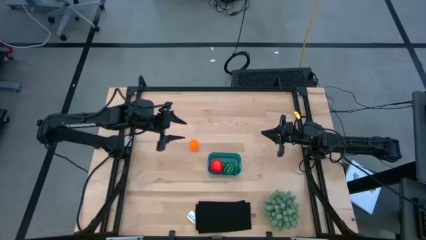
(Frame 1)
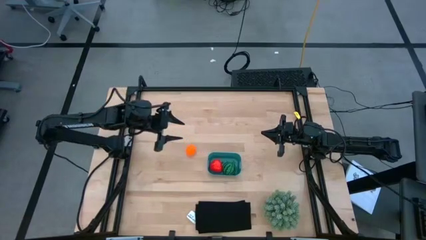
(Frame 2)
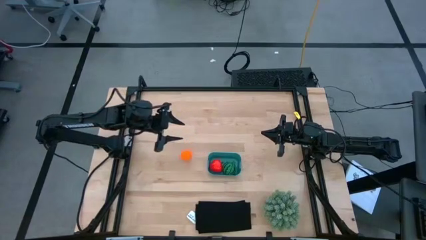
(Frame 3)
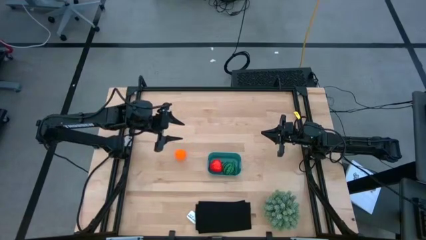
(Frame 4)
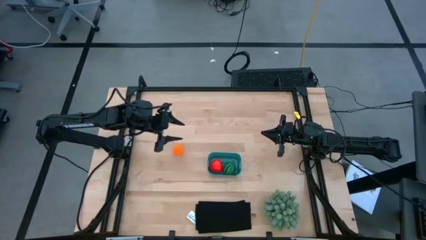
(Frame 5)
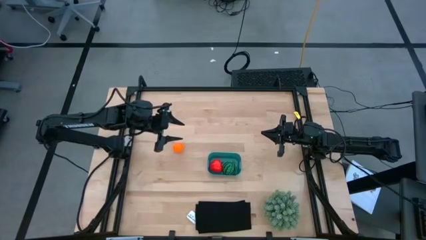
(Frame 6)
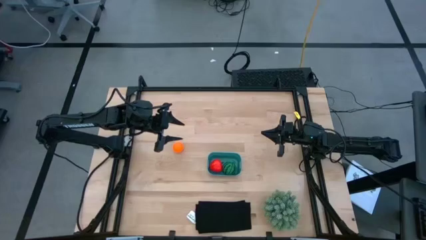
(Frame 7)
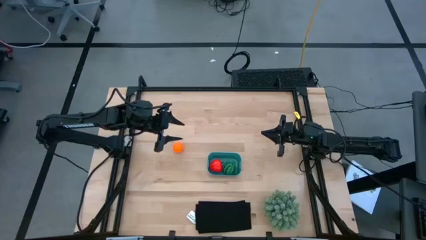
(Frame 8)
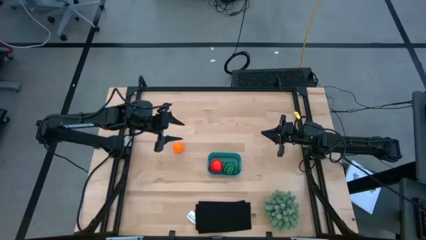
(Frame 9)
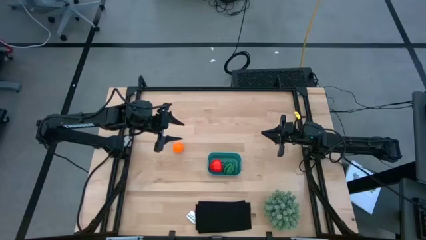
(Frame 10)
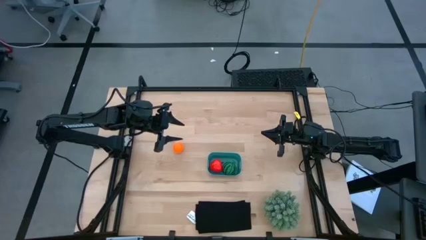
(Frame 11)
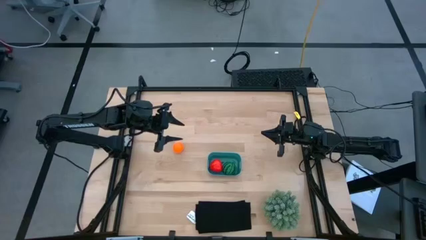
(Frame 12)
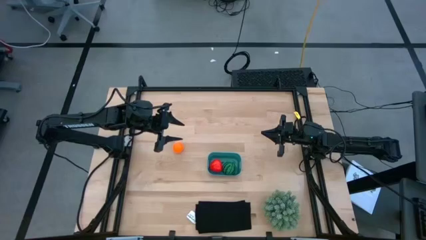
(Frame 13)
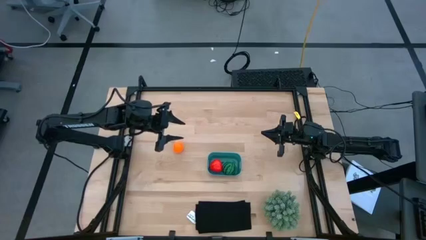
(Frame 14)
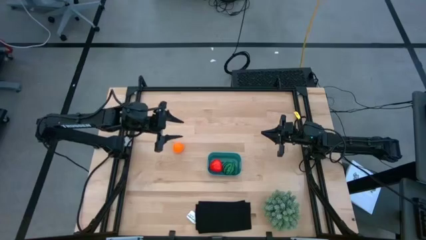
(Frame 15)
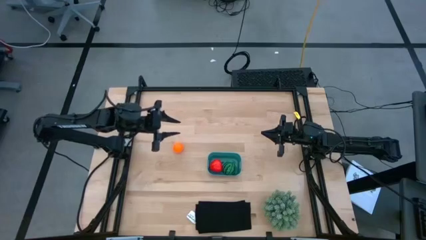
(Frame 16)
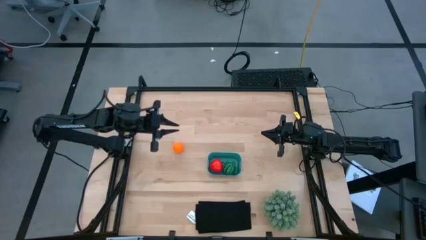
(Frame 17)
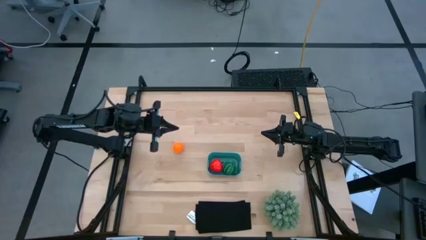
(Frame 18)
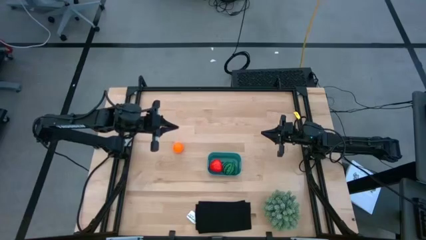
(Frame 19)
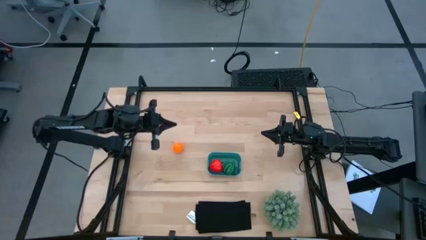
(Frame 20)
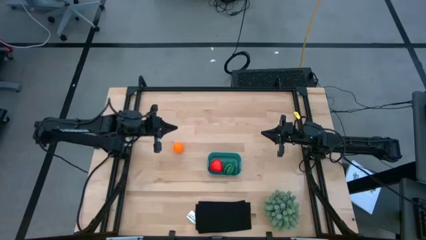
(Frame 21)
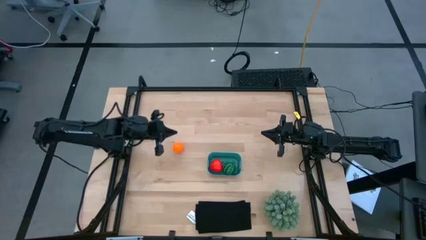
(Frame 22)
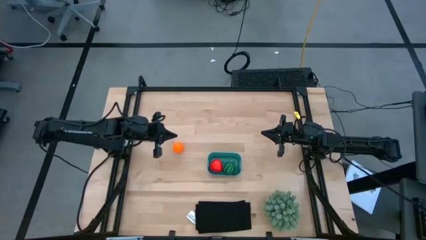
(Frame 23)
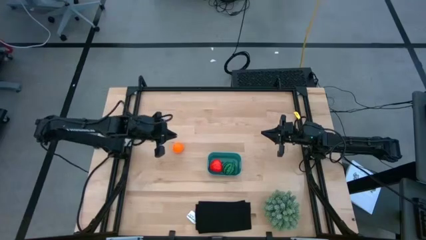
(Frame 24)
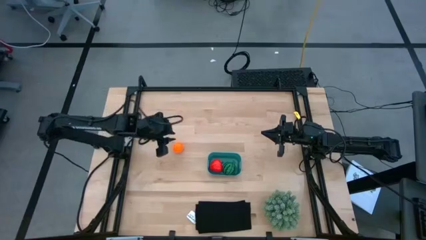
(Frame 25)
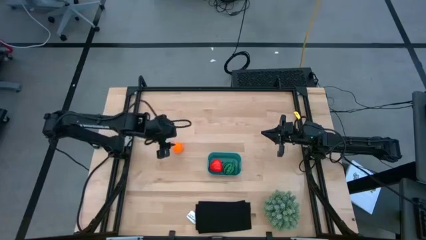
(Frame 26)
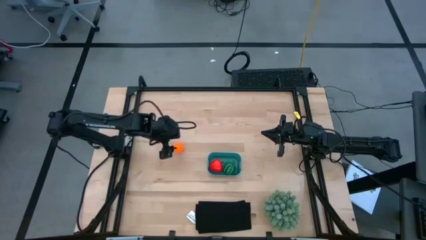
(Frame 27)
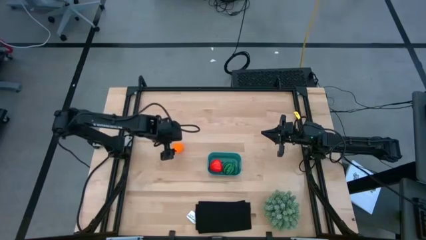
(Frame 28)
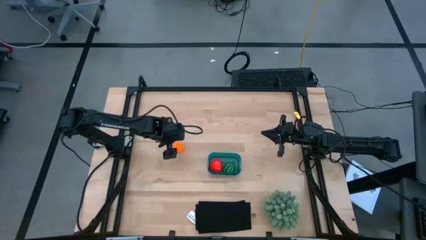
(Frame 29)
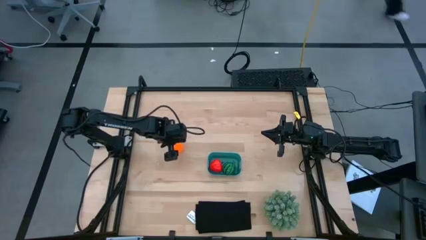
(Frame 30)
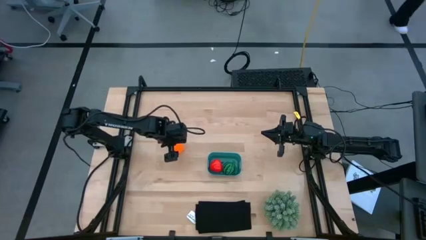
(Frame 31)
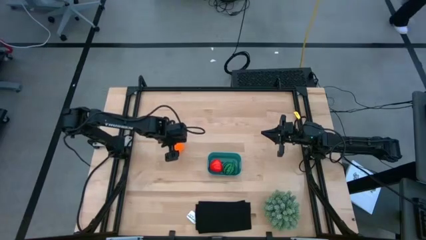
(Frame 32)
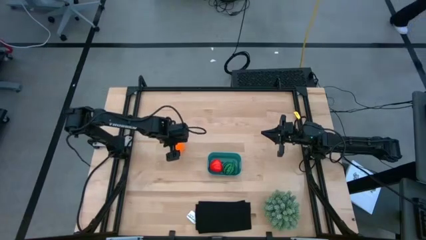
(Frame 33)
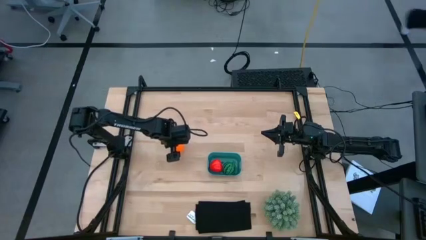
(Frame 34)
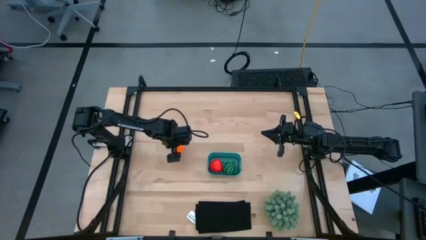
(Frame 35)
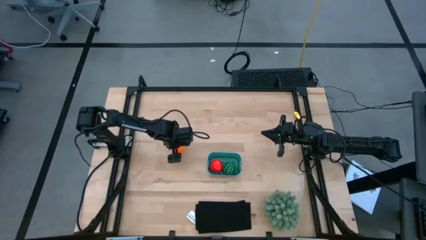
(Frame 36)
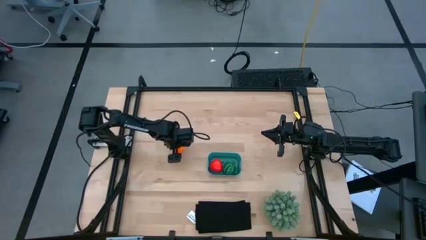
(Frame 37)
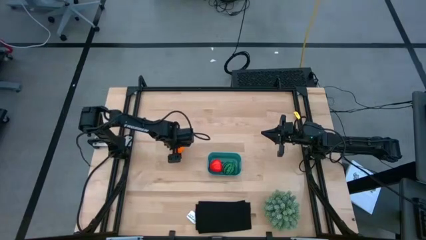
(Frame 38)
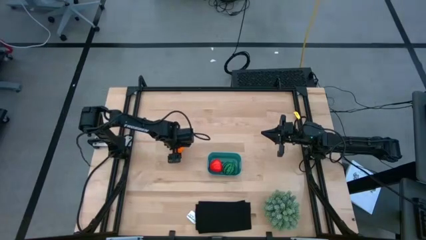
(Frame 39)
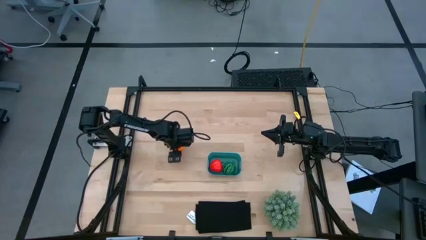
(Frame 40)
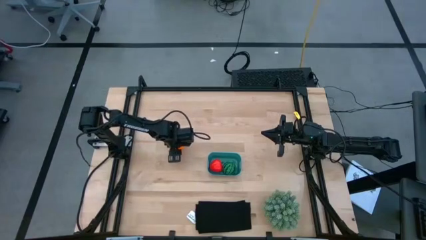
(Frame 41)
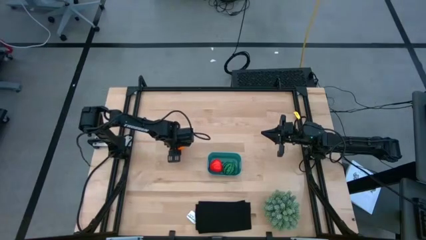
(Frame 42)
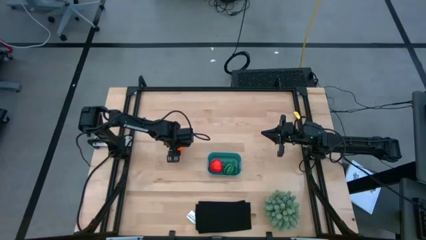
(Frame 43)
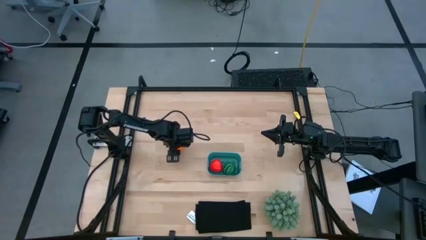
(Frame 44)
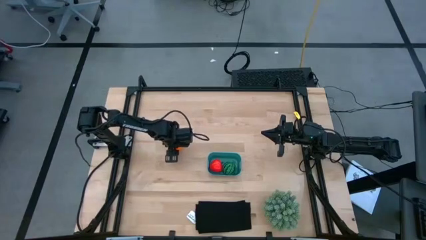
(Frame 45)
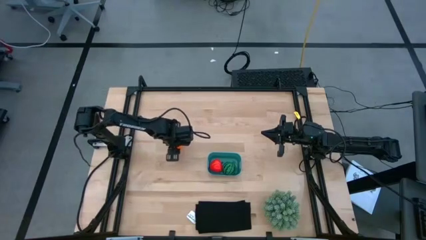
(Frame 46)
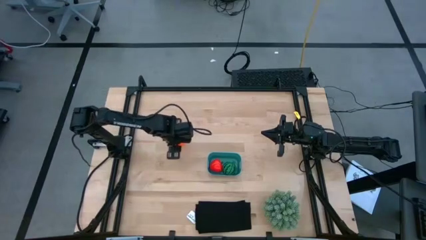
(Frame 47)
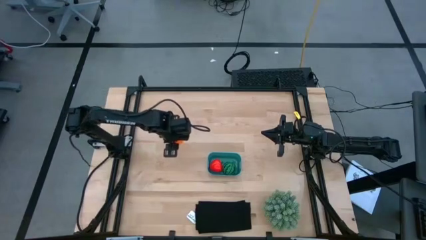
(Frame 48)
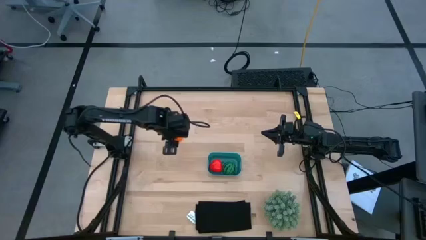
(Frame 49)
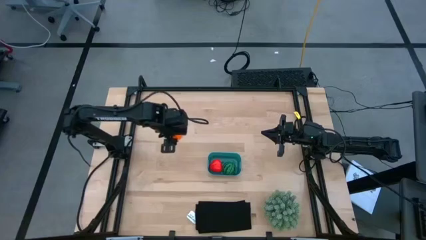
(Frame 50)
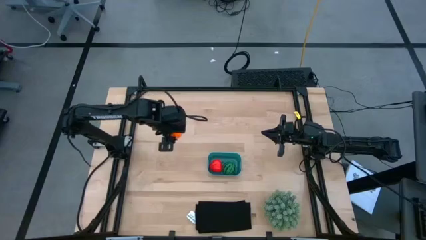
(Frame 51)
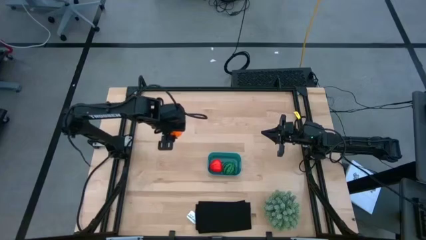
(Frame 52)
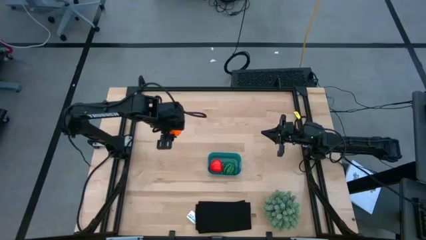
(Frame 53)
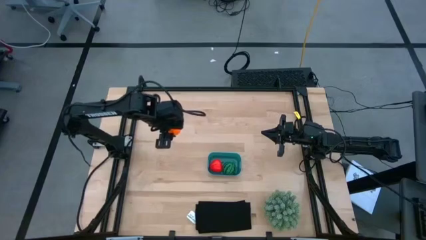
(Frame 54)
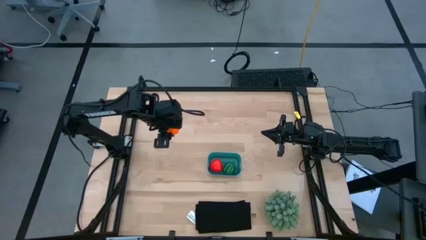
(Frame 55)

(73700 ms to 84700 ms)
Task: Pick and placing Produce into tupperware
Put the orange pumpkin into the blue container

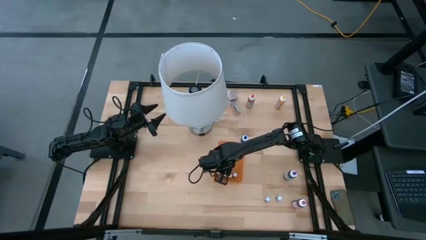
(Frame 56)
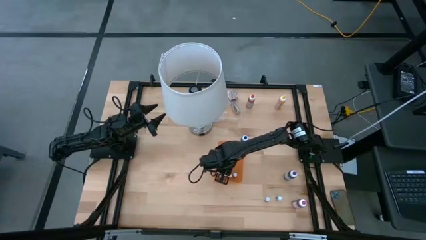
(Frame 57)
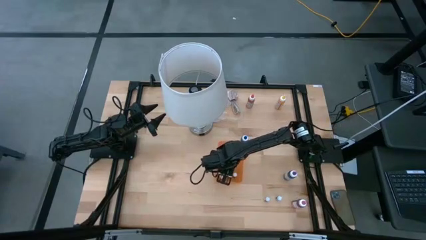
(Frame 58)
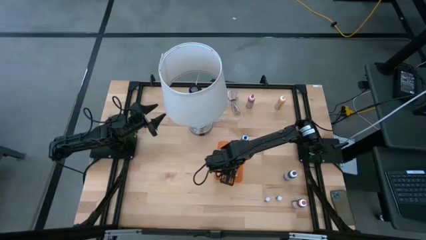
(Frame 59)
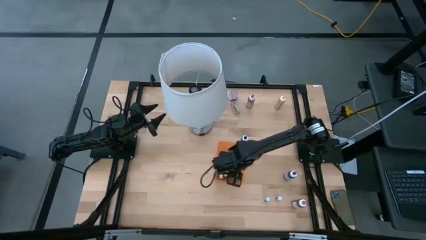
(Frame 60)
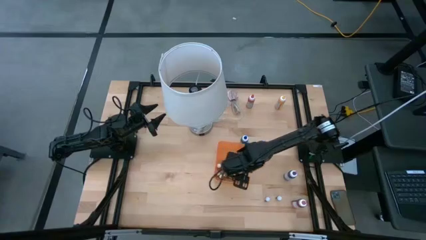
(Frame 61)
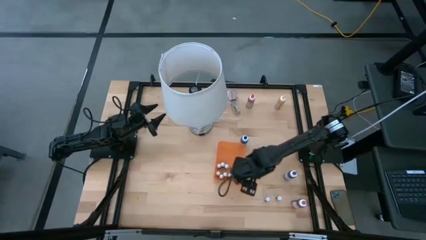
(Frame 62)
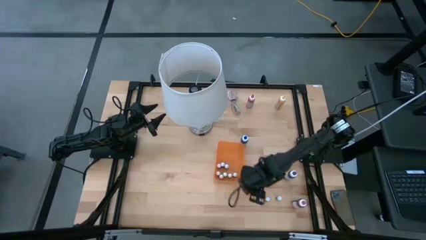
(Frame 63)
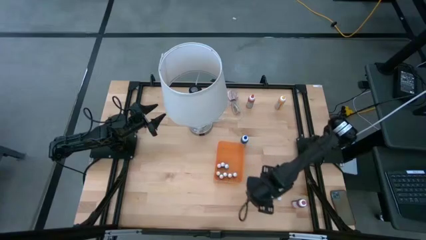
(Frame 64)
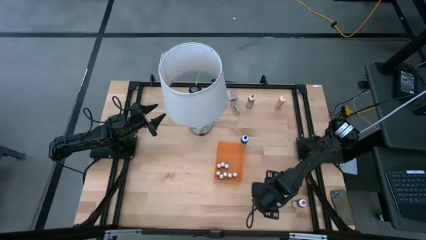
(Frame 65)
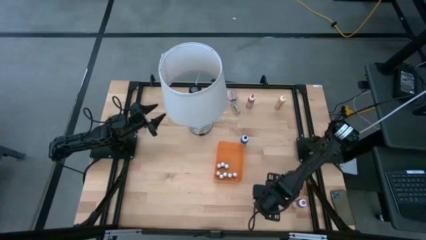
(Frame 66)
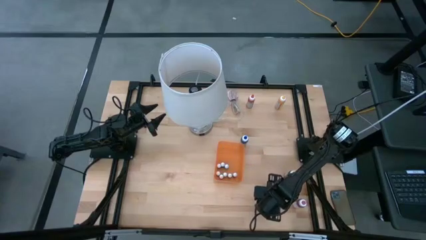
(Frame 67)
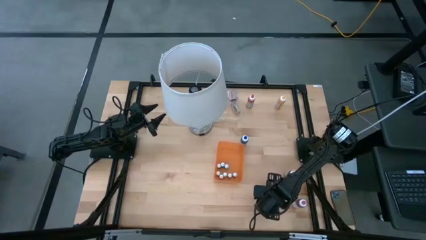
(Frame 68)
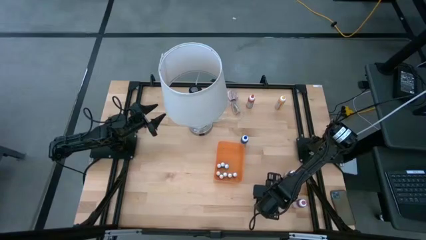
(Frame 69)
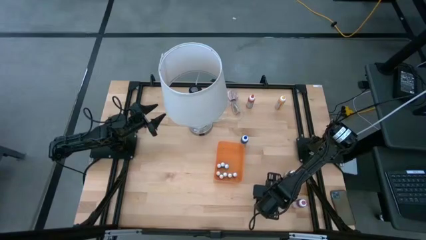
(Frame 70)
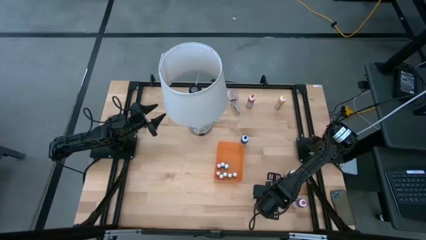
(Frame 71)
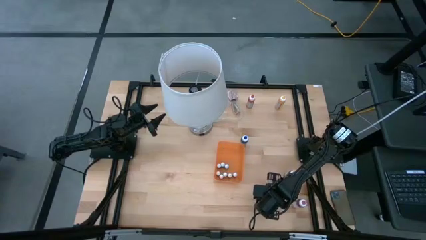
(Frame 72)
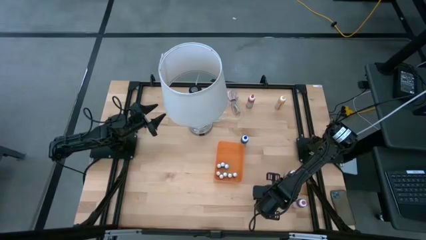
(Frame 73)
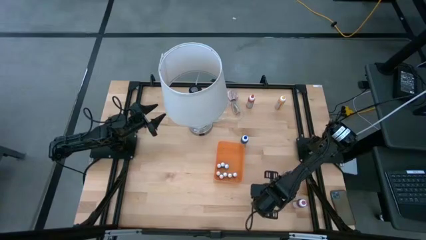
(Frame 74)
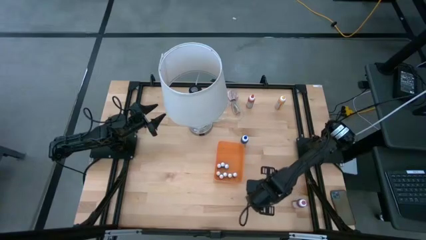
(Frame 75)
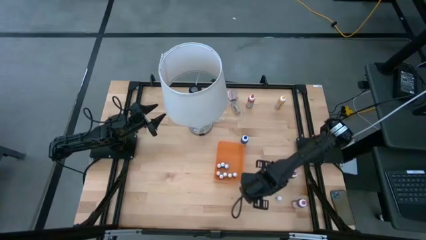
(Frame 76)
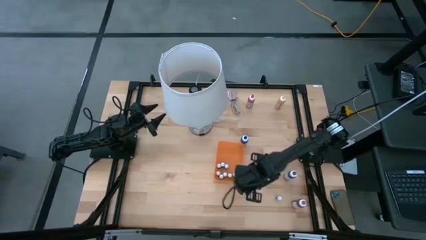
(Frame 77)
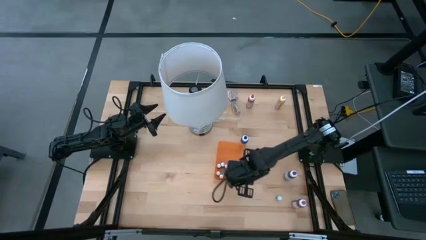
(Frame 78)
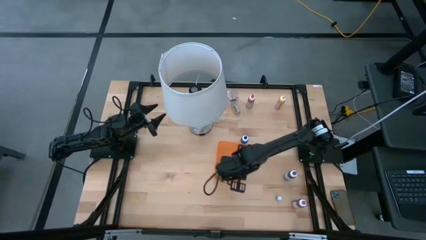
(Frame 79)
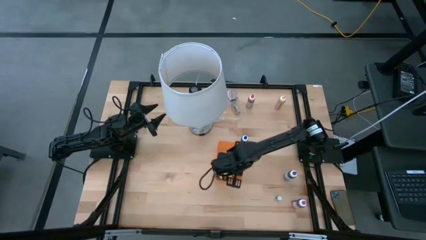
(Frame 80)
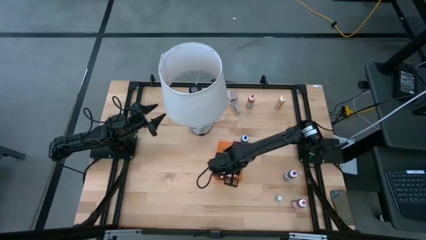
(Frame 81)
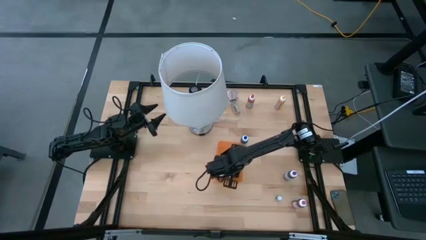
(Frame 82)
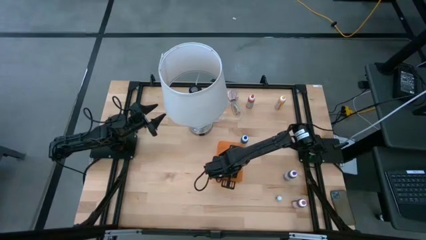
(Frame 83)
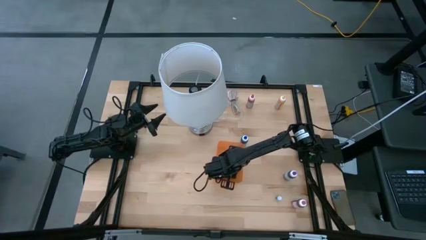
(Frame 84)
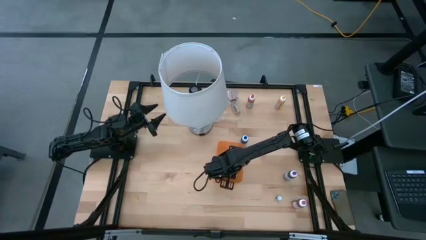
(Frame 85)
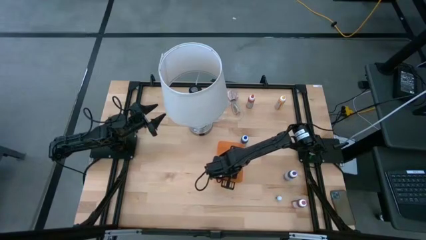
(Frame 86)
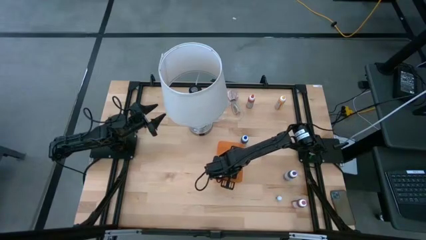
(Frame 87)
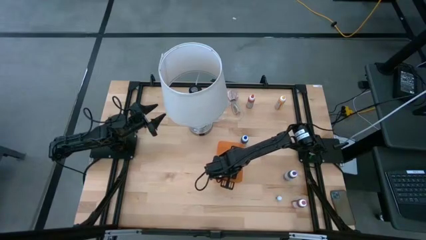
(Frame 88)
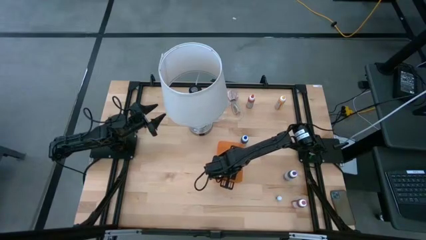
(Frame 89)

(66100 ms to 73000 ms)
Task: Pick & Place food coloring
Put the blue food coloring bottle into the orange bin
